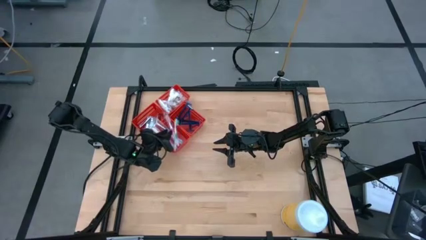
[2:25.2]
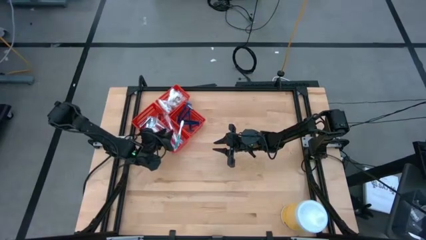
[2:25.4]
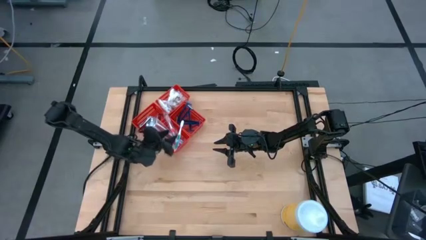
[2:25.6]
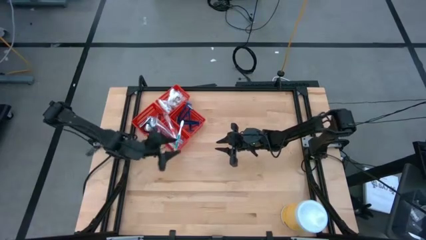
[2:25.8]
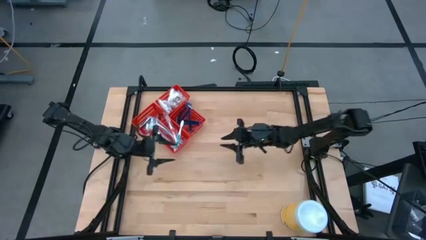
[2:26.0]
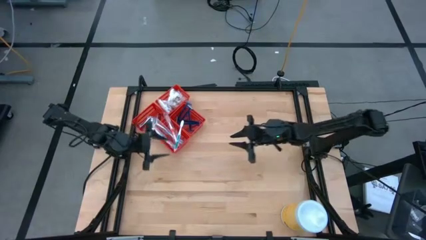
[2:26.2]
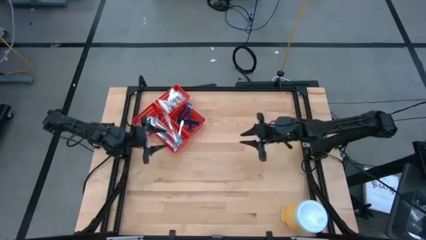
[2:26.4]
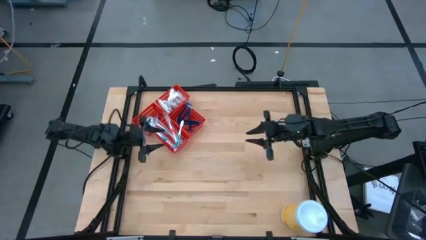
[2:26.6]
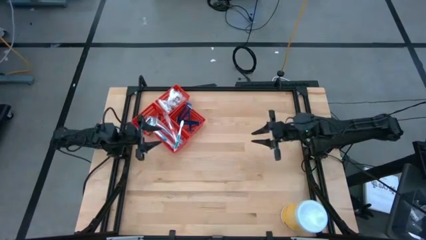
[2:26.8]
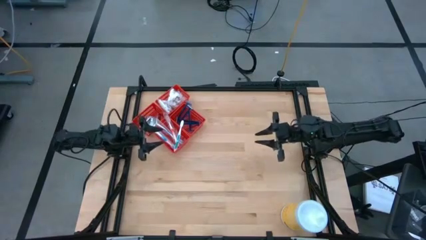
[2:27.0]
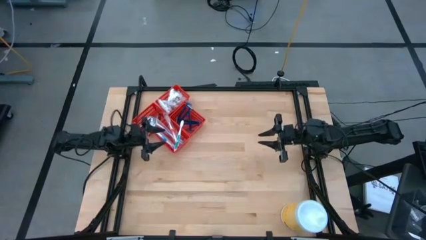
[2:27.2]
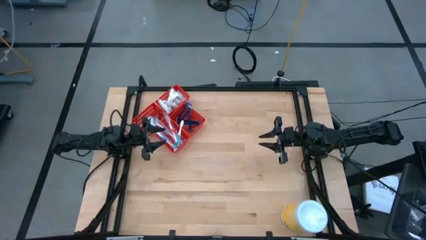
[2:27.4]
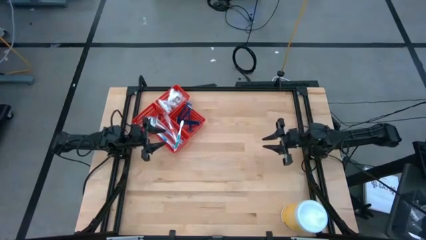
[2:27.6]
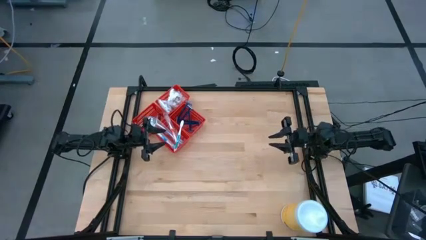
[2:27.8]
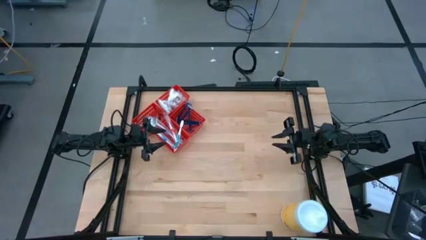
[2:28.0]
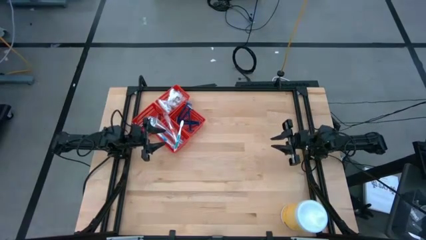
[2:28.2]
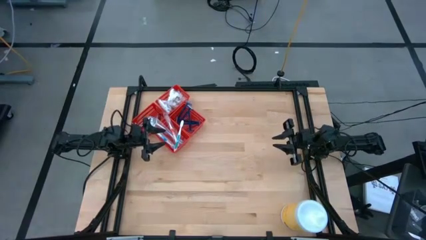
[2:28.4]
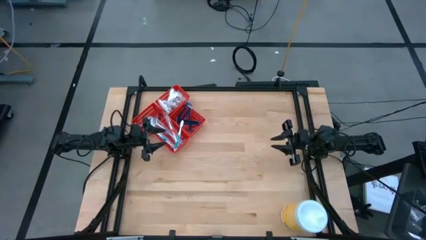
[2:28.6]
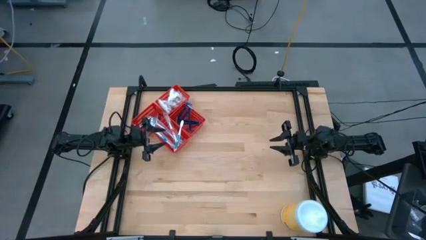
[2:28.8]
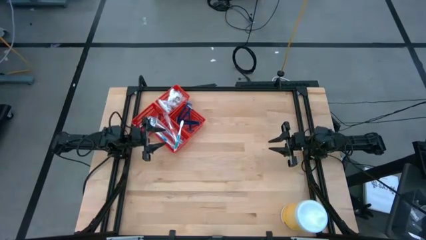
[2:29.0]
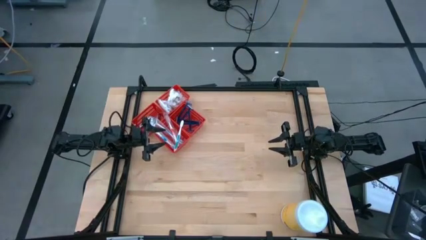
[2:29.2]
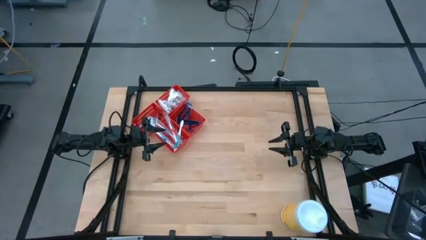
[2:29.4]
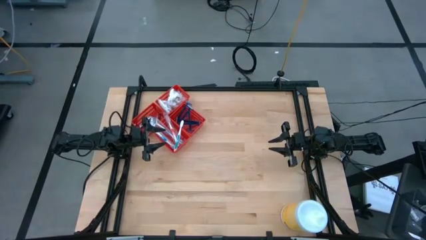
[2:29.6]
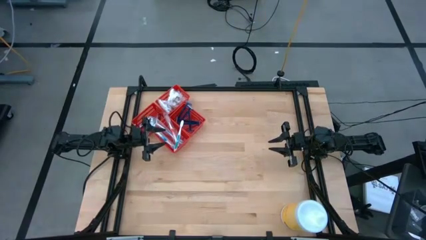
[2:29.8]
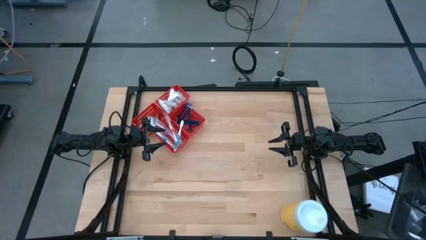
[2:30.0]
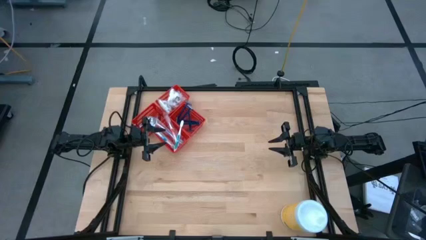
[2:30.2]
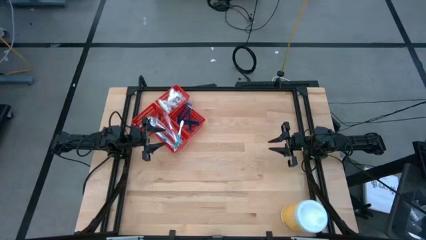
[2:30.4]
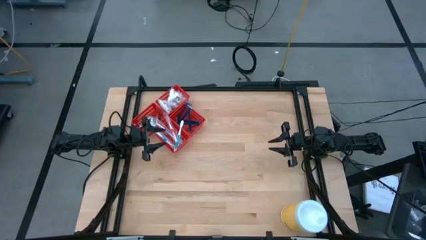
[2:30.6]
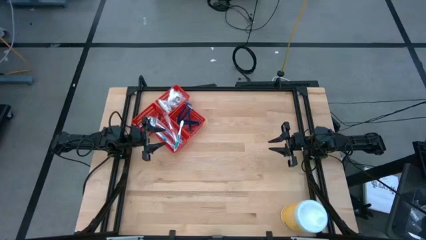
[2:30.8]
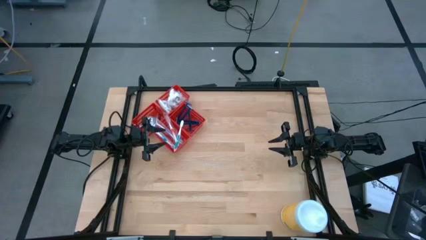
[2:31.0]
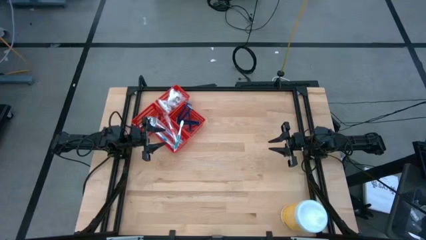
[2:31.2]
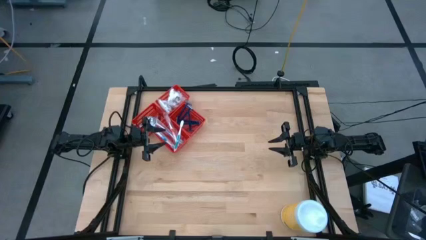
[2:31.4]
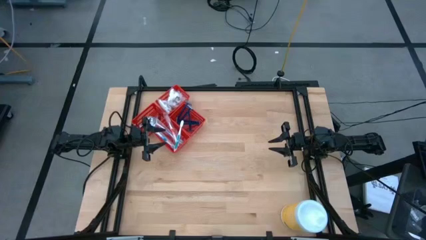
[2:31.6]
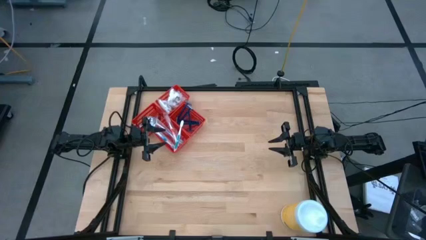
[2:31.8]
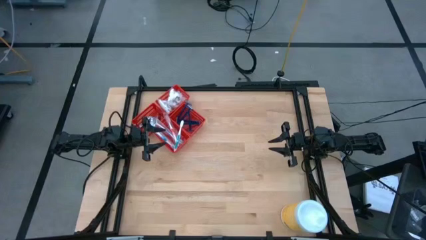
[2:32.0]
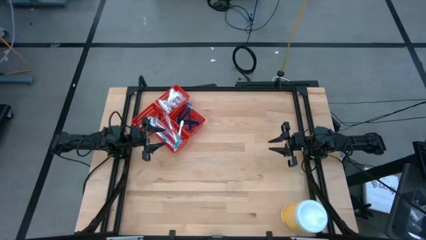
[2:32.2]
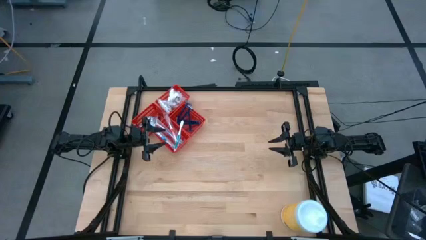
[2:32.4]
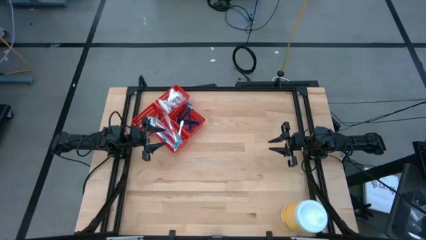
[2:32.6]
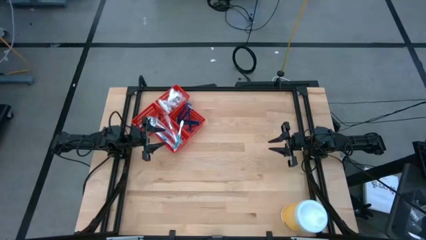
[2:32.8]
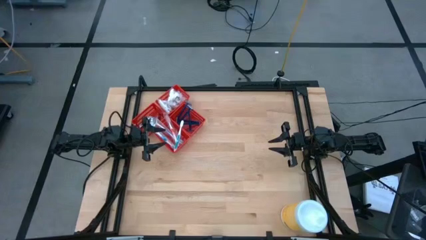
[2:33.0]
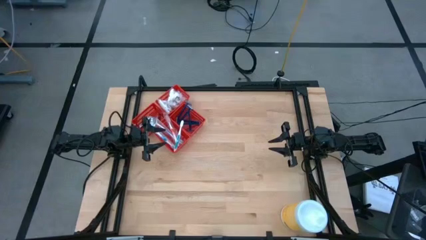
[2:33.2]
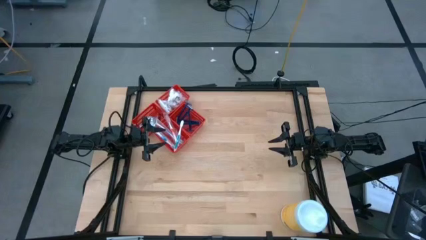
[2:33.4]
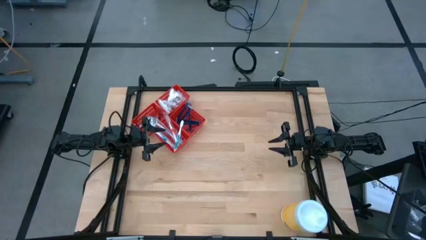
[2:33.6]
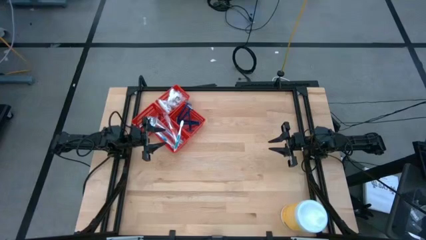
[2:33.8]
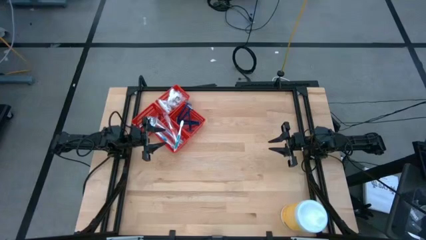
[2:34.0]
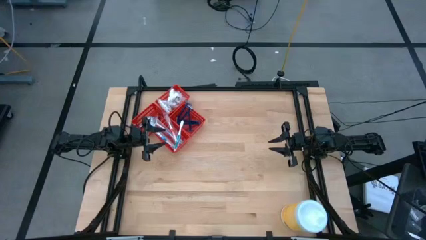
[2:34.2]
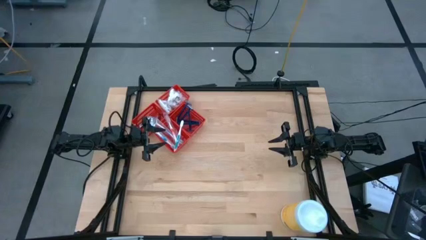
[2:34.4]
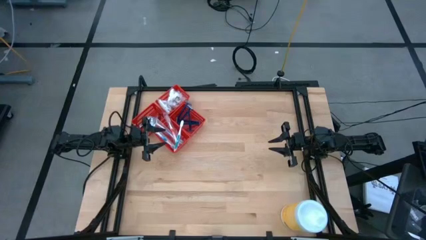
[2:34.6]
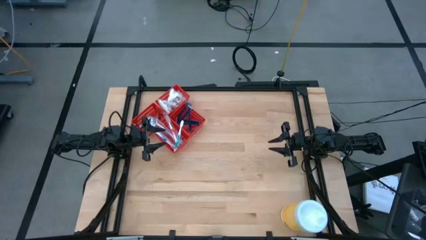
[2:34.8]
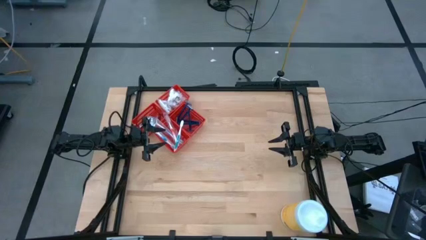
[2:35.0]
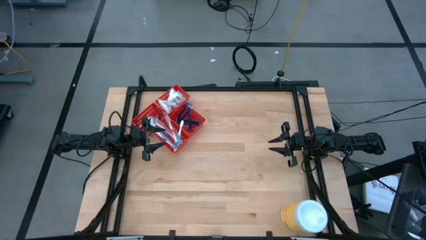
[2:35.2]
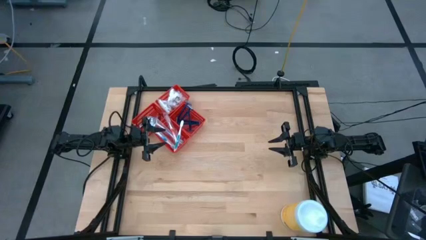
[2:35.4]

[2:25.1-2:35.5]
Task: Pick & Place Travel size toiletries
Return to Home Position

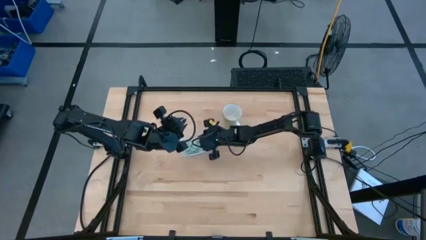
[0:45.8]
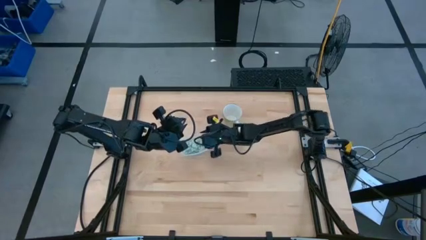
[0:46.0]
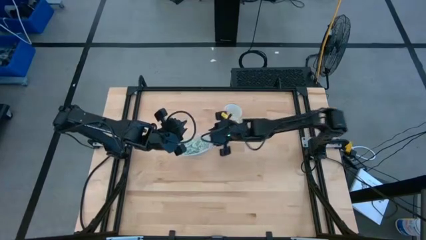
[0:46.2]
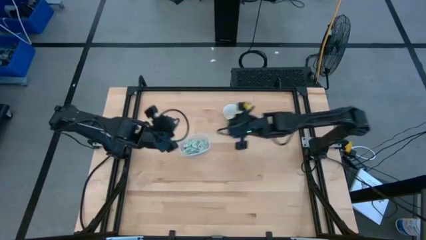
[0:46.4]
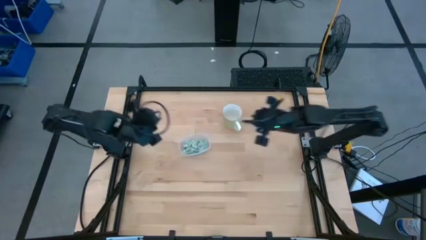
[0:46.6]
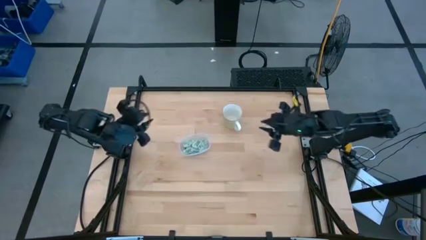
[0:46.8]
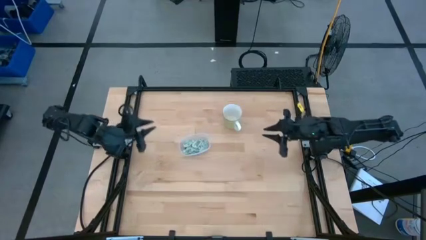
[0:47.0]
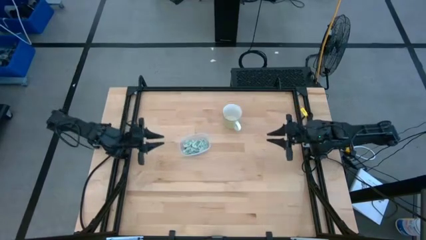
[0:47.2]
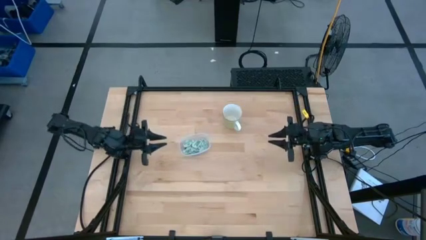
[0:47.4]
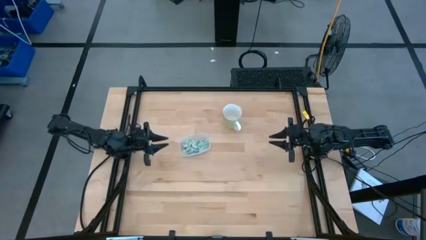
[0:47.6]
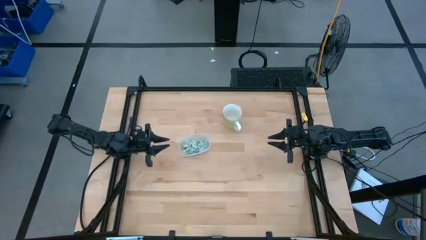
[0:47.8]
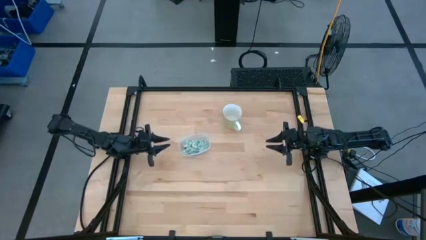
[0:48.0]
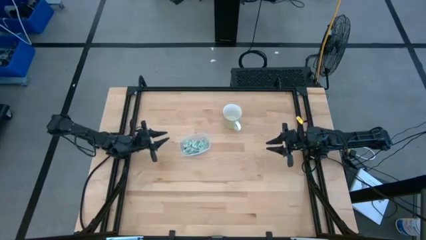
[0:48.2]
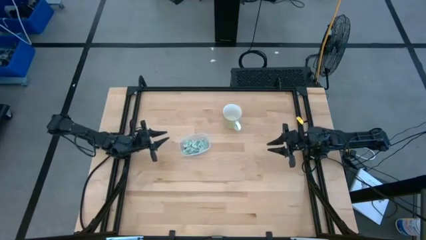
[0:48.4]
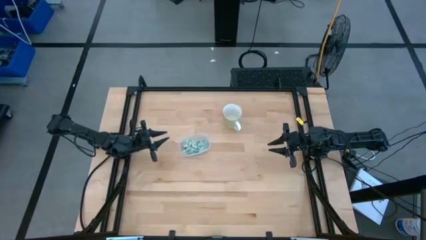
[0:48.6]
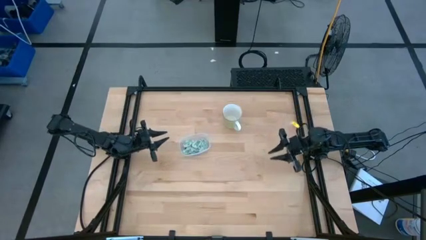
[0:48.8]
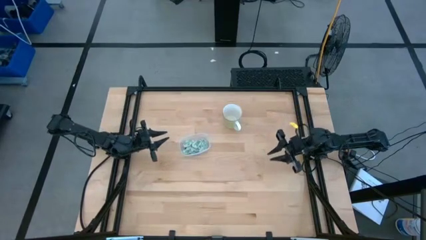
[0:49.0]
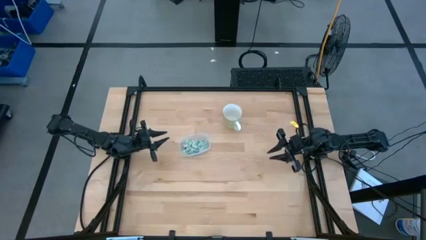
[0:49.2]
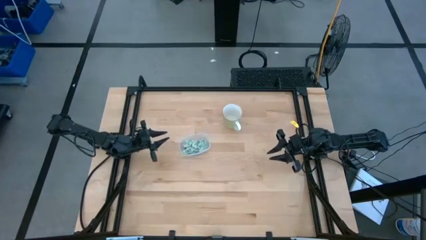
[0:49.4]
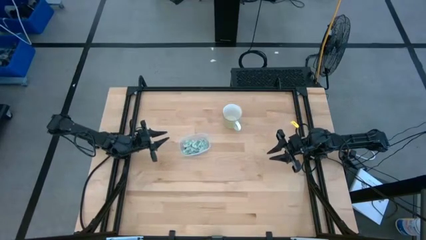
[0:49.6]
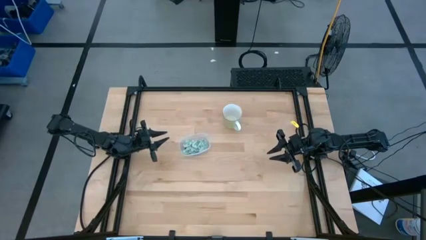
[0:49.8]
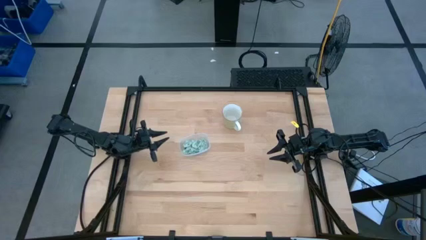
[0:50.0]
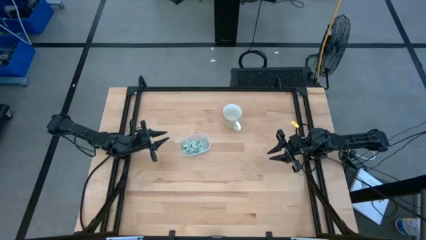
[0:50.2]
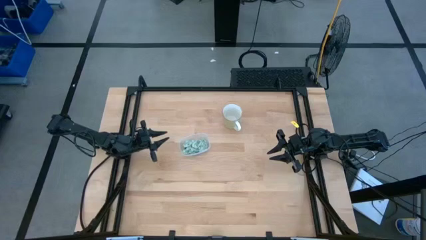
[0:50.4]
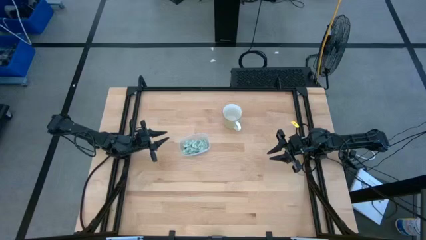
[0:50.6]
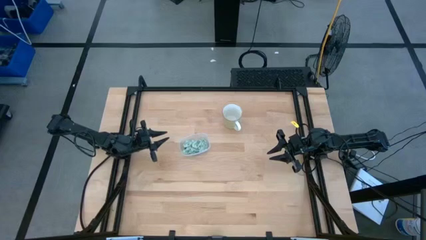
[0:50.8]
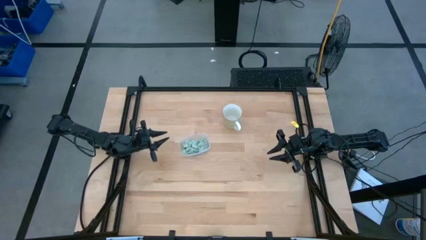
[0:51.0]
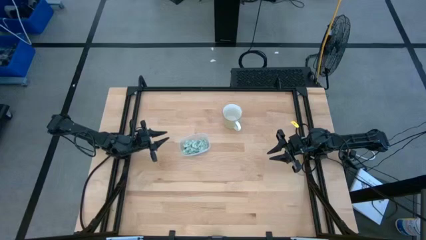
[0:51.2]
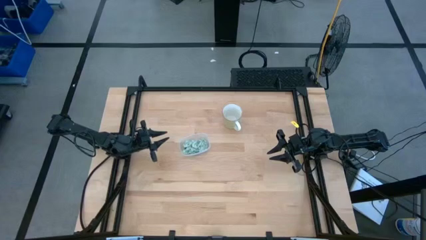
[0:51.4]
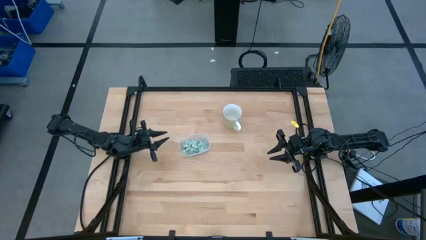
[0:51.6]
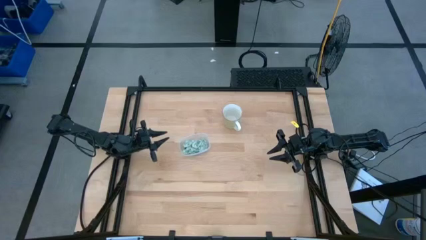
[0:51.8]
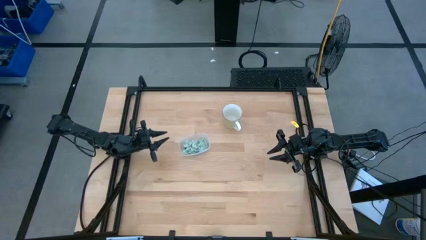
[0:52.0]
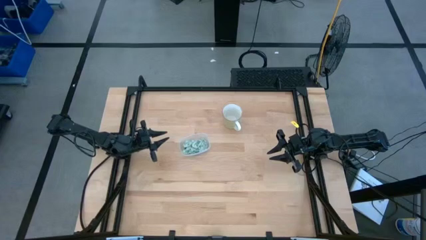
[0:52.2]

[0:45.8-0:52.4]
Task: Pick and place Stevia / Truvia into bins
Return to Home Position
